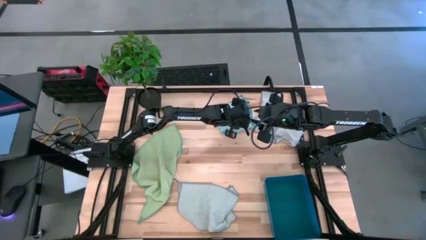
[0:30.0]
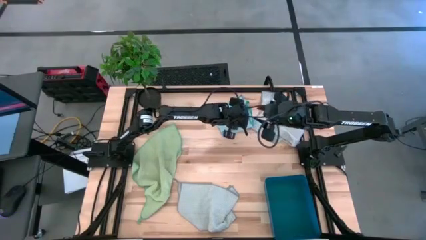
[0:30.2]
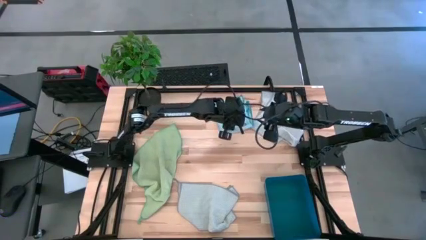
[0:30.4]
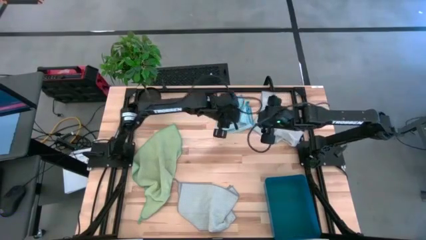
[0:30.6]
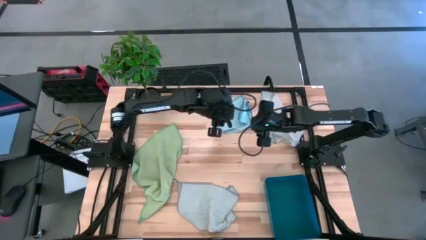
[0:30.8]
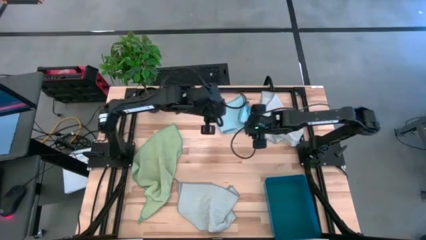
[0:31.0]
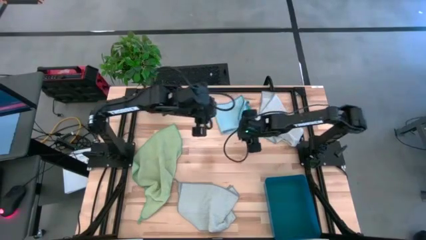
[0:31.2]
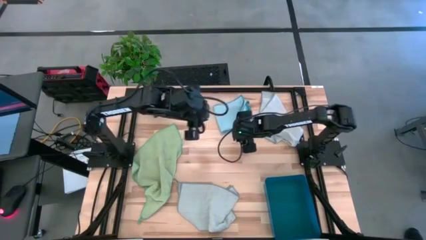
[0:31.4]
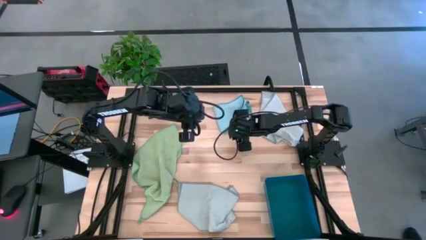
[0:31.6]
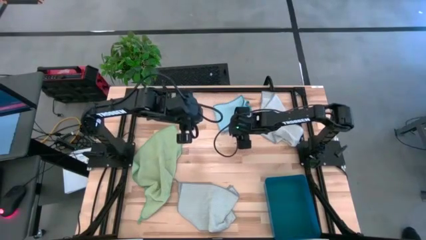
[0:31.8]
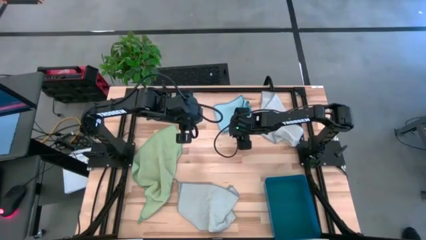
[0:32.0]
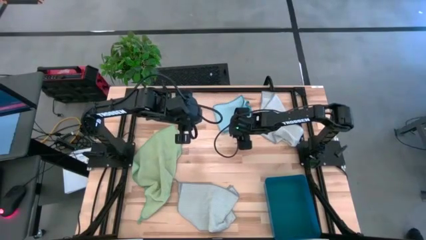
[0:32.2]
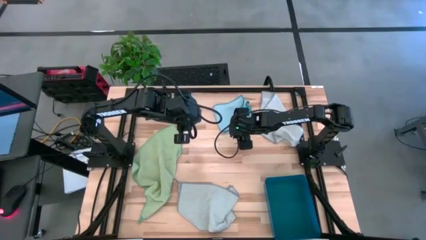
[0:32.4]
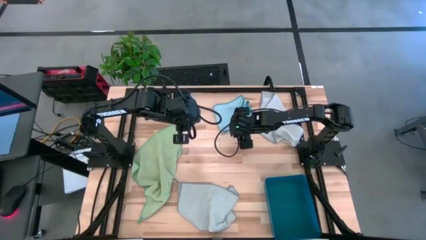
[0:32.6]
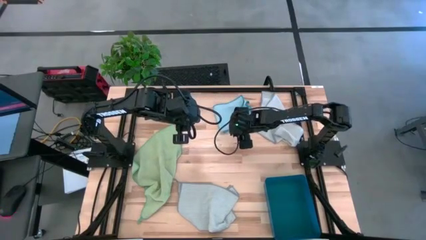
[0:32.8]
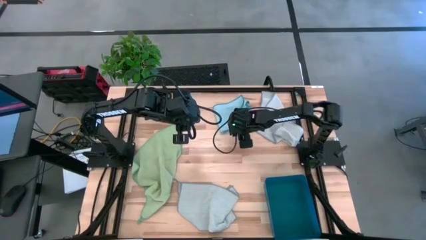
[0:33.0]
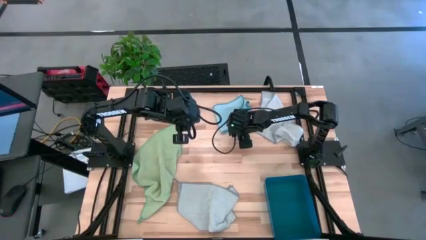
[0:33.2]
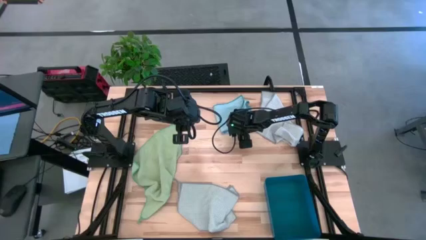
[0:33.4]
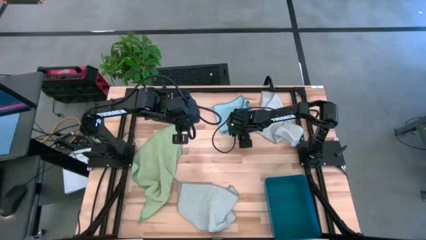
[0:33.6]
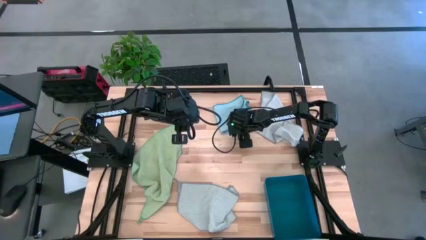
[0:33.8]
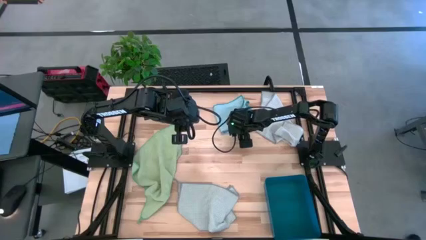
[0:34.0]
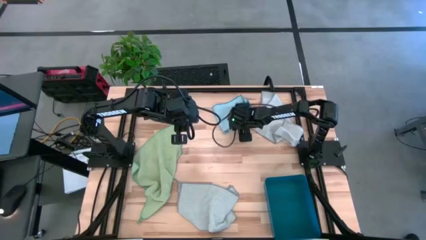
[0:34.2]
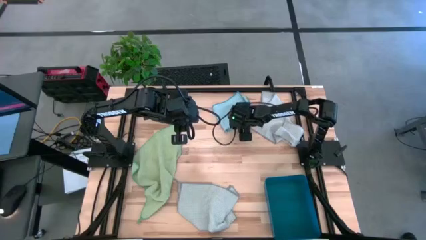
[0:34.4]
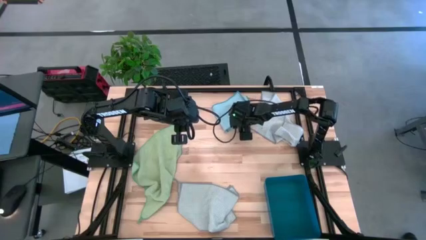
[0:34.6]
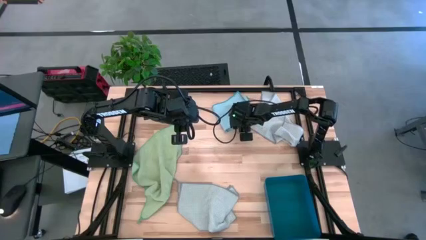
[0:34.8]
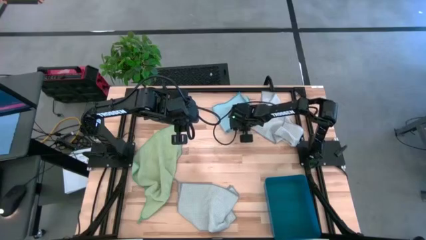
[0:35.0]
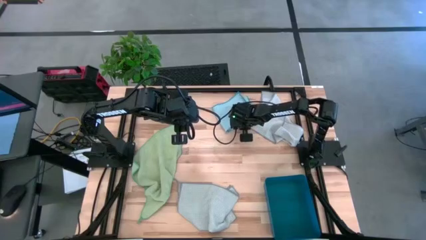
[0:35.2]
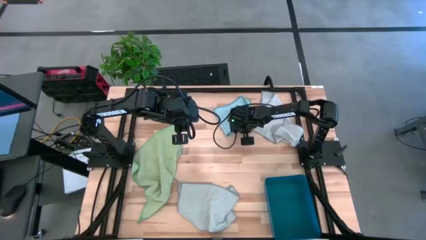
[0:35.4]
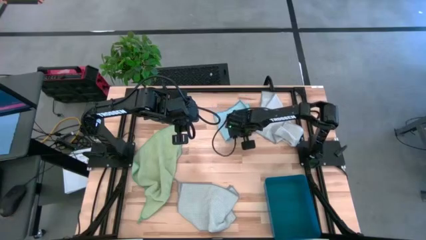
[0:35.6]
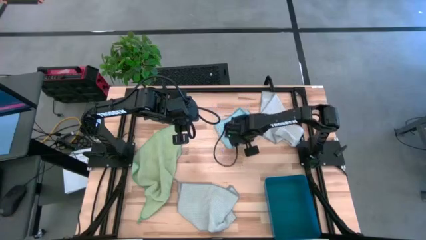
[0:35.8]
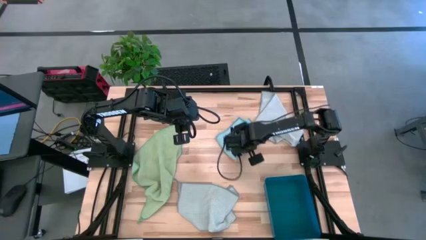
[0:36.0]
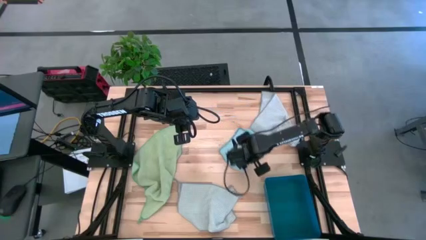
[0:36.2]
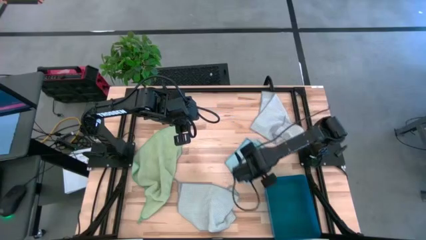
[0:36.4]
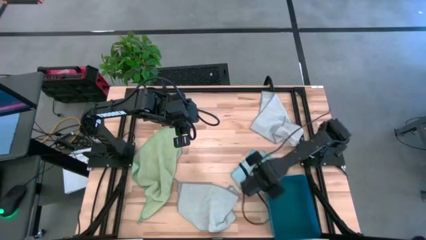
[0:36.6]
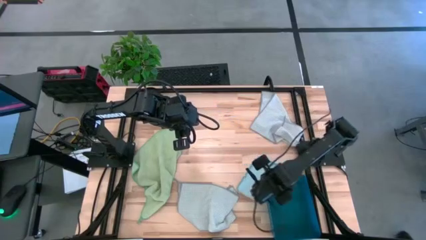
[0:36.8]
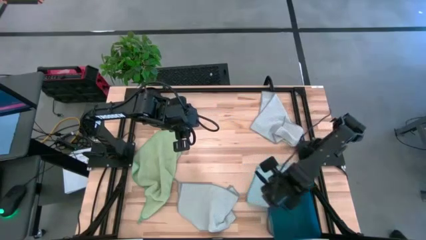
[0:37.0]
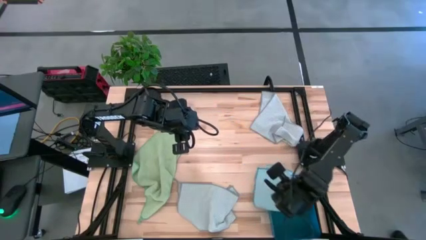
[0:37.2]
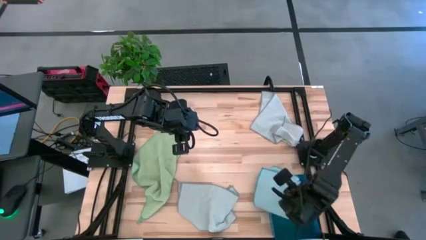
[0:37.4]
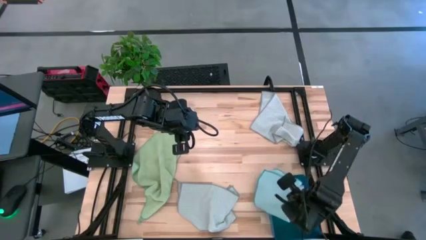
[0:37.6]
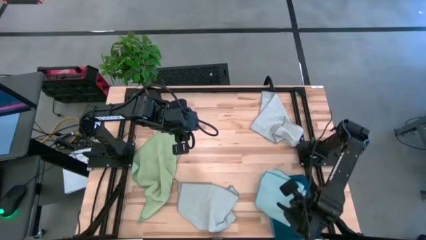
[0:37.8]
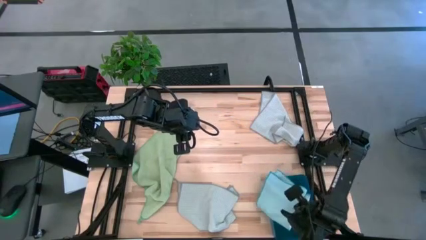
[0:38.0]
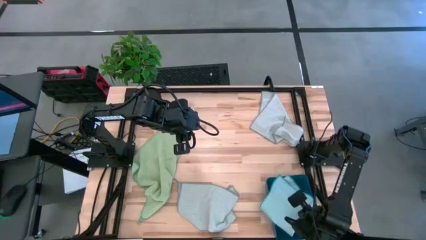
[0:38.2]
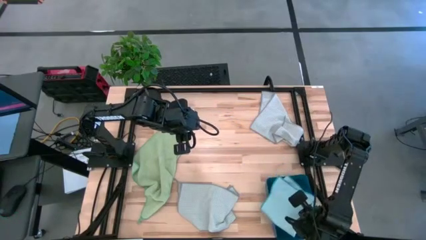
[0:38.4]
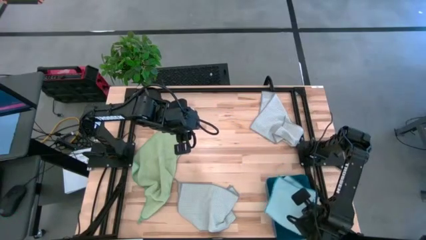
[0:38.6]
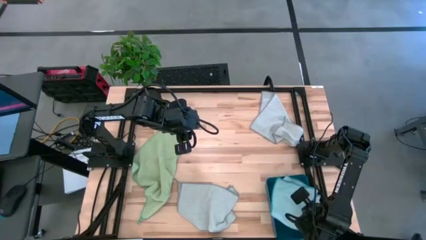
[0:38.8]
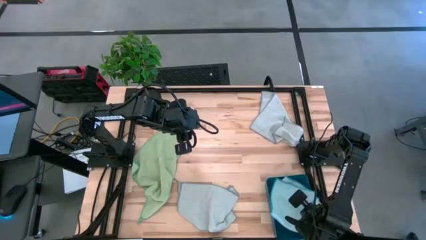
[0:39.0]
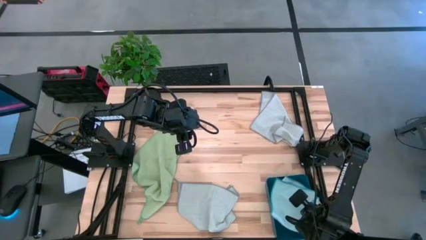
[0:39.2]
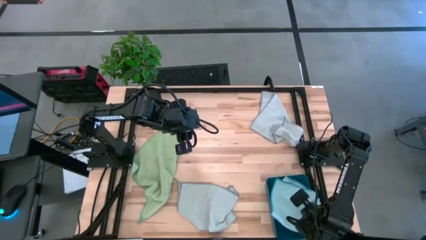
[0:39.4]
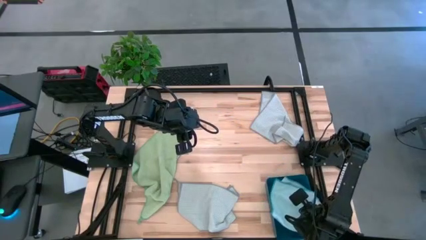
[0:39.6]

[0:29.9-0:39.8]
Task: Fold microfiber towels
Put the blue microfiber towel into the blue bin
